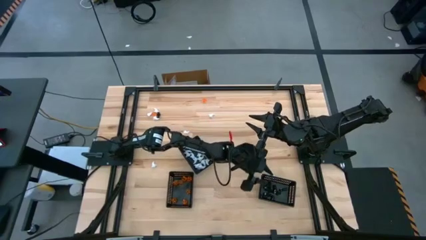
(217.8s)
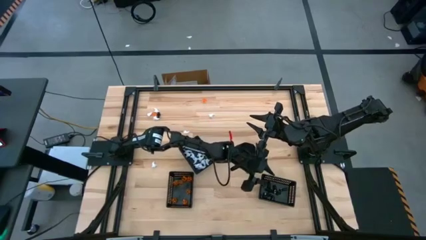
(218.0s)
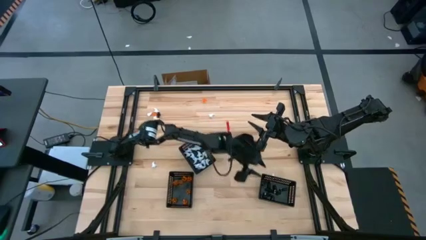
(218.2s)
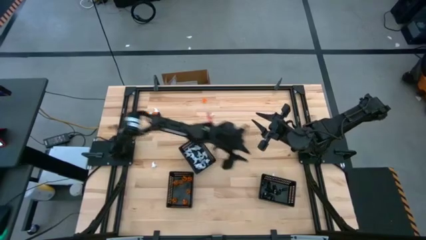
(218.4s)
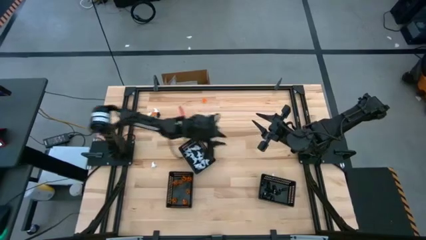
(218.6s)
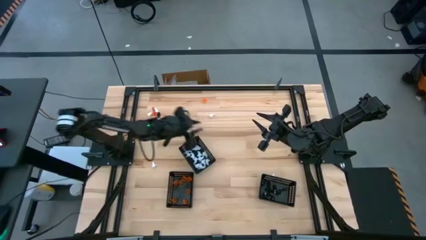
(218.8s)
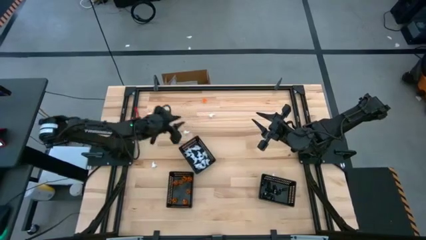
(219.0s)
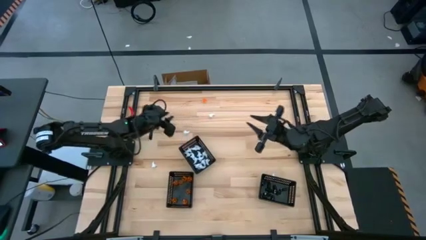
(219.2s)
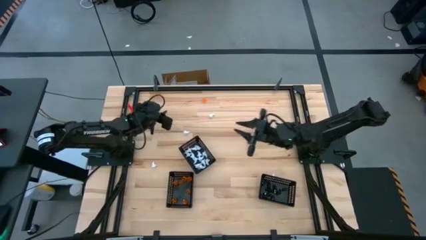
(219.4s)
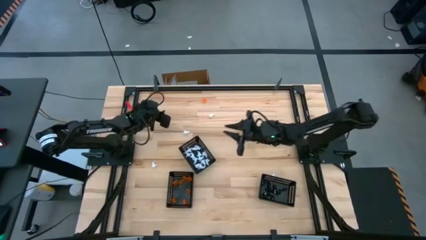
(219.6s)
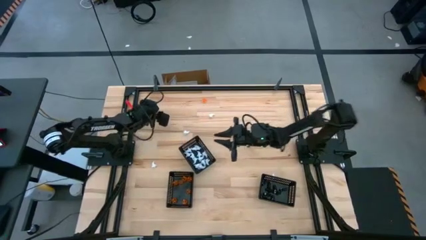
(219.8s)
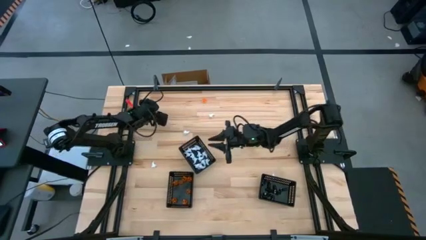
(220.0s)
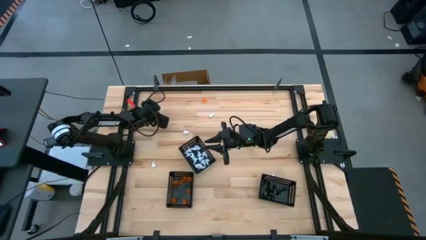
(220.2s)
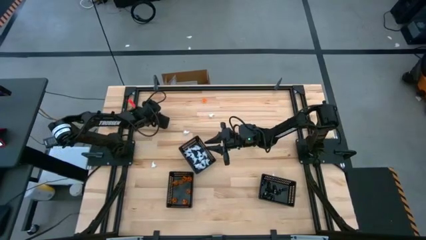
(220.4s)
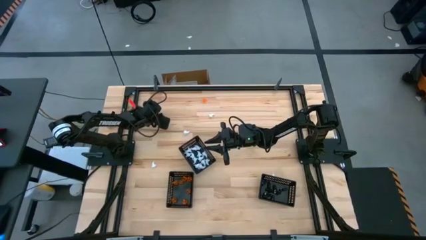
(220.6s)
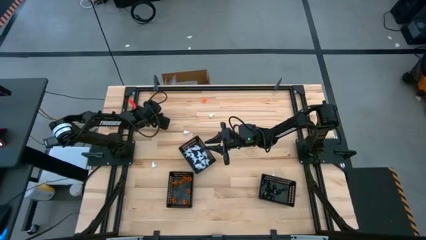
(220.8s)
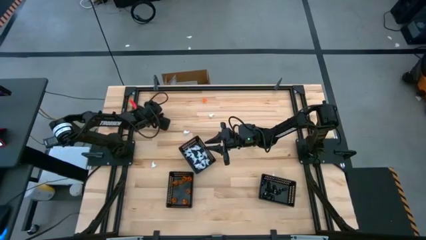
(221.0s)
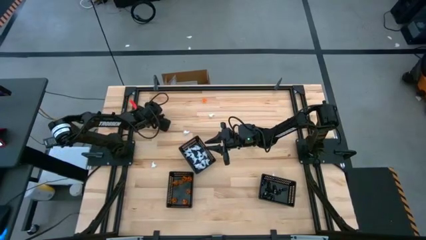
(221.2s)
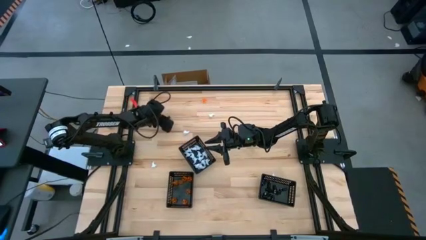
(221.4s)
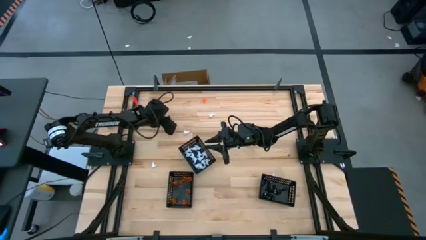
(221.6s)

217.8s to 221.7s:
Task: Sort Halloween decoration
Put the black skeleton toy into the right black basket

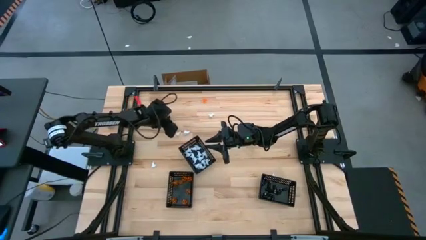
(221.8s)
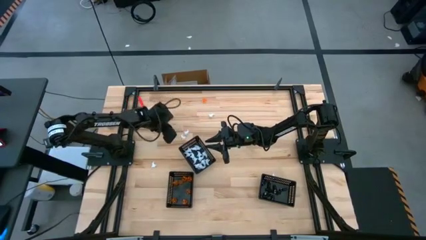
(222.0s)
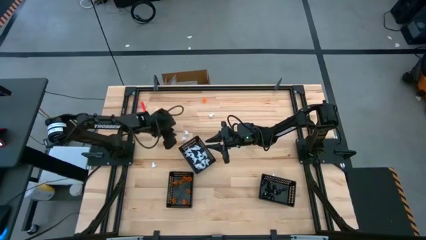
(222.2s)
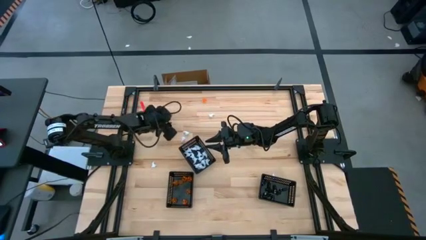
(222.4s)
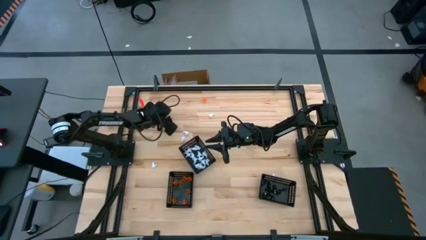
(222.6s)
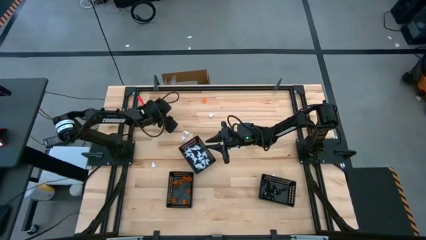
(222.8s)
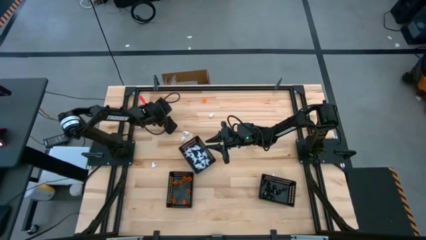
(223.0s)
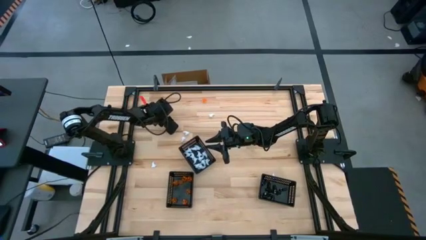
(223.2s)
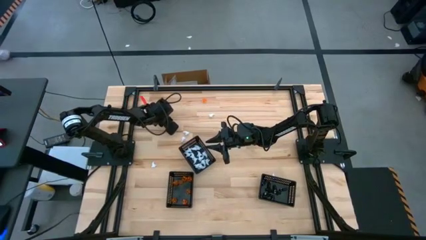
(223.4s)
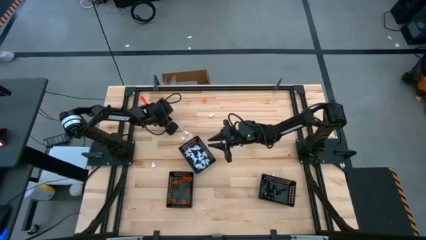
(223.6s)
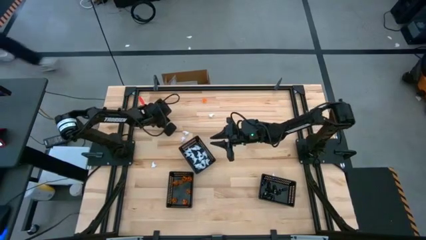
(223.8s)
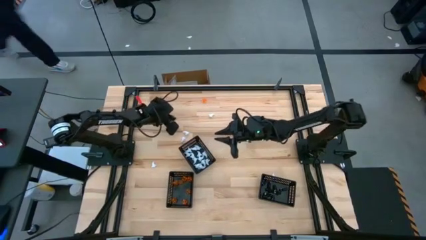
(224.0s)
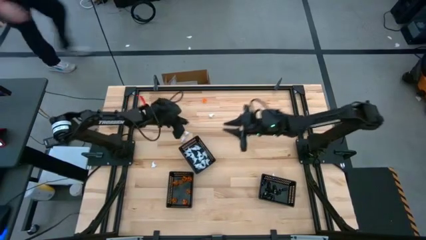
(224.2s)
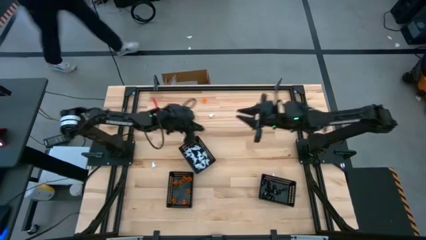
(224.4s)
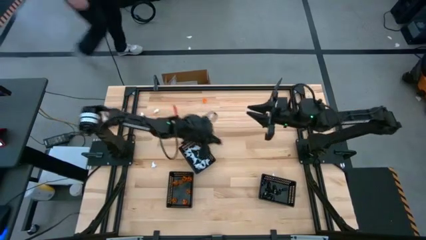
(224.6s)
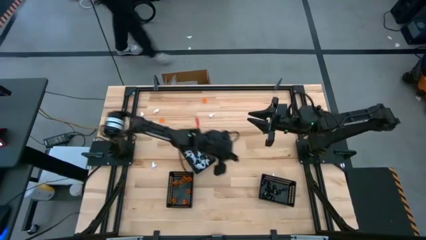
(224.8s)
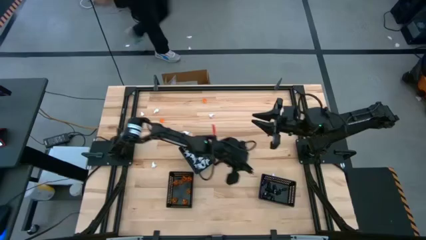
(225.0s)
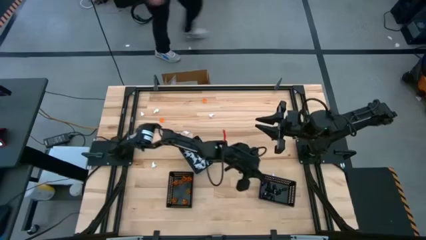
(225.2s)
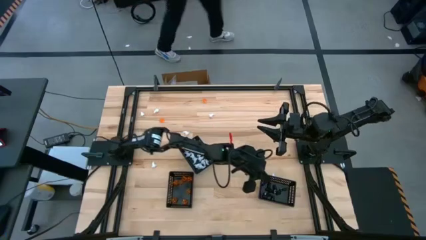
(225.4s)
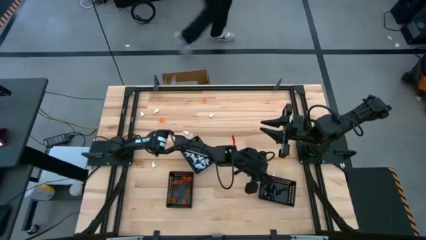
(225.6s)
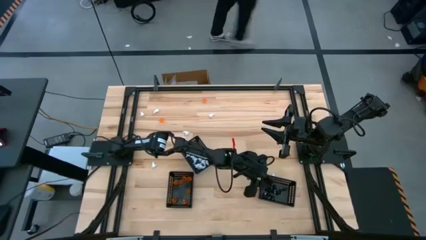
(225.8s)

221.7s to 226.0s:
Put the black skeleton toy into the right black basket

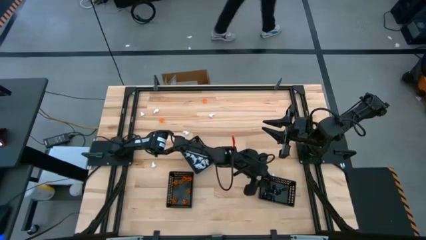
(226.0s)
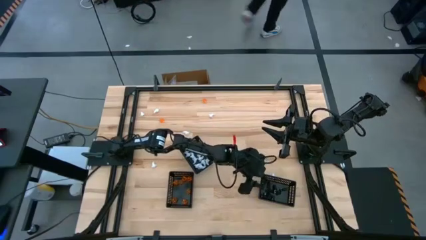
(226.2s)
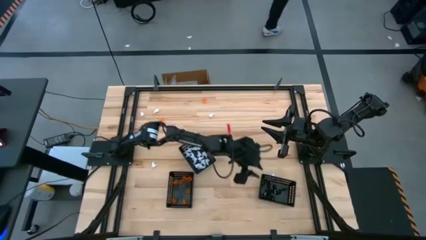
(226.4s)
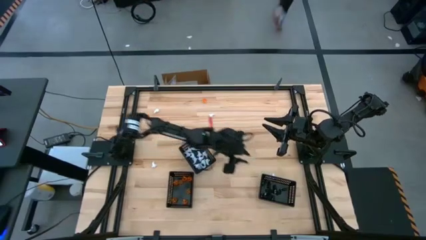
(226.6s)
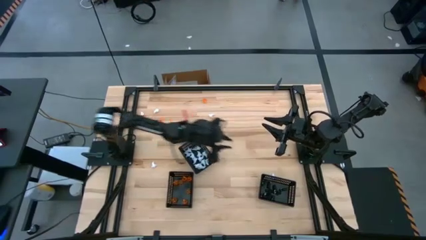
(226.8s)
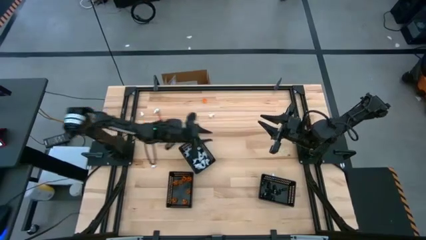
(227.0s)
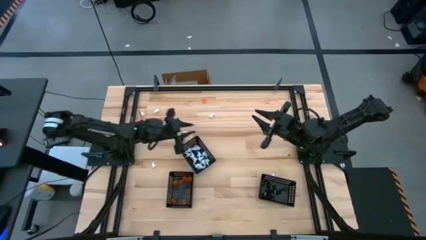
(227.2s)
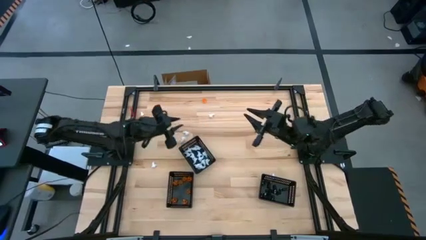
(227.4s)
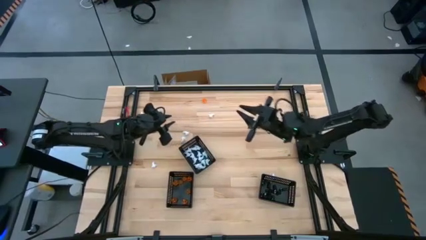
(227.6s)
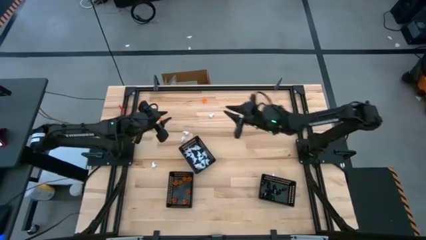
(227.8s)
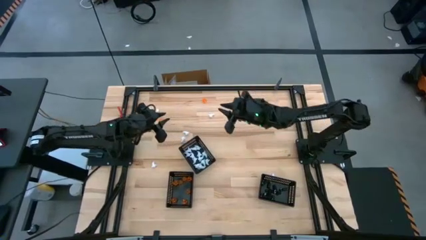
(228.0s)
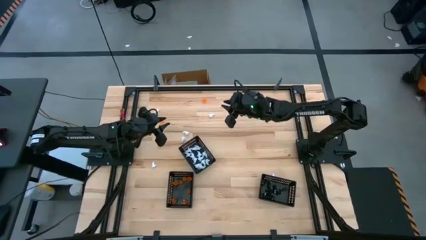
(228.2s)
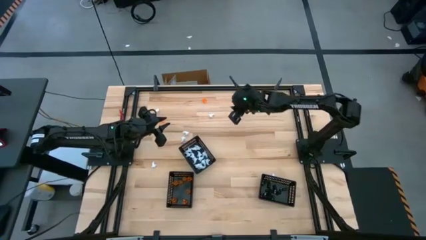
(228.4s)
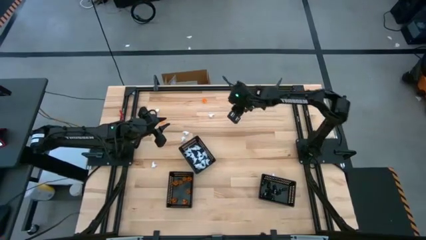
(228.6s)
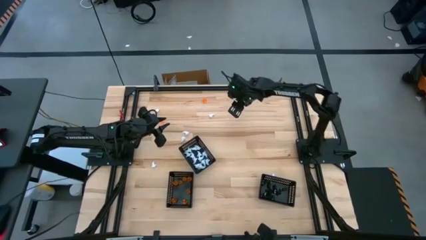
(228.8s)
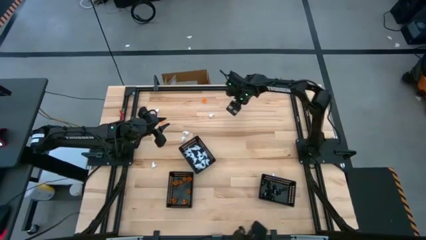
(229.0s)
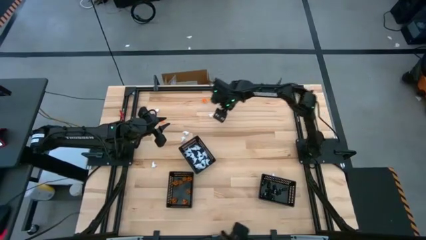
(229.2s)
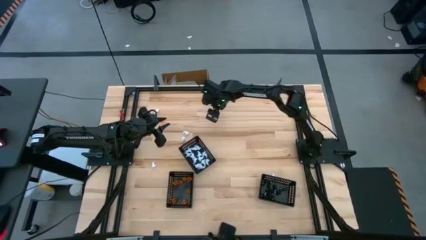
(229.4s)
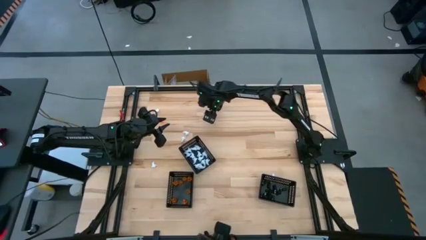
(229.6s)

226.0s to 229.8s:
Put the white ghost toy into the middle black basket

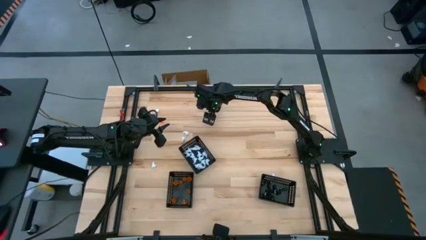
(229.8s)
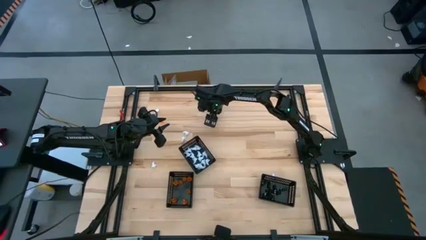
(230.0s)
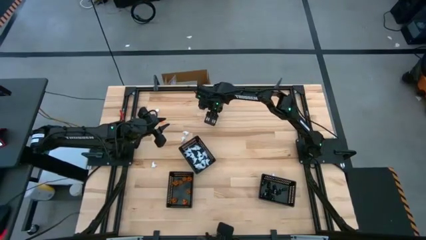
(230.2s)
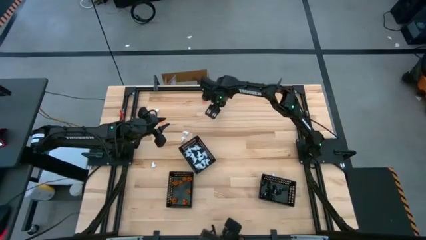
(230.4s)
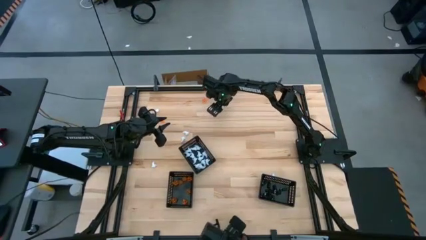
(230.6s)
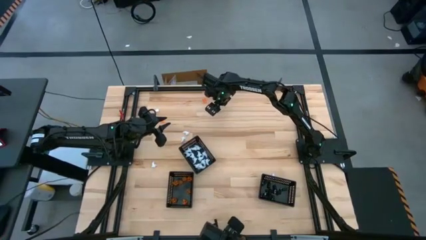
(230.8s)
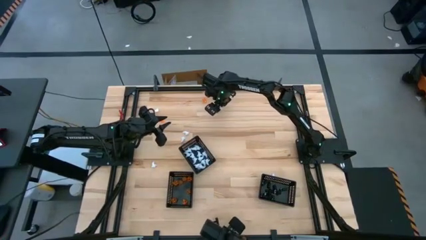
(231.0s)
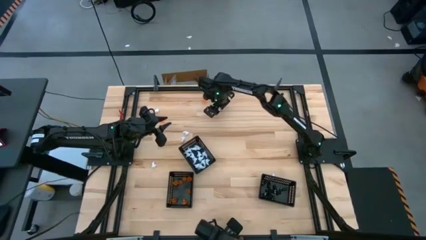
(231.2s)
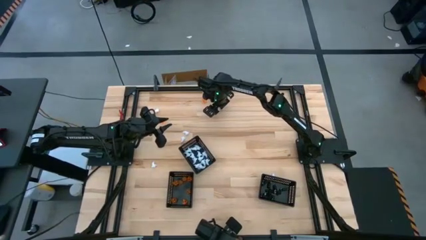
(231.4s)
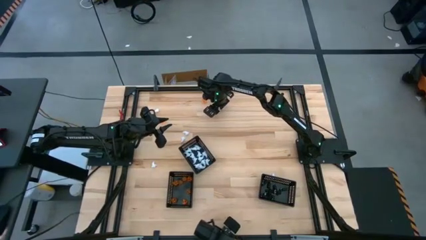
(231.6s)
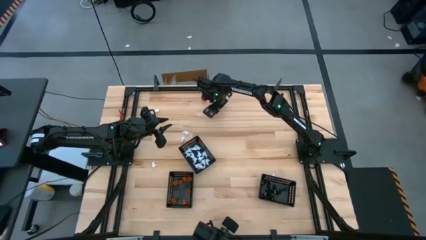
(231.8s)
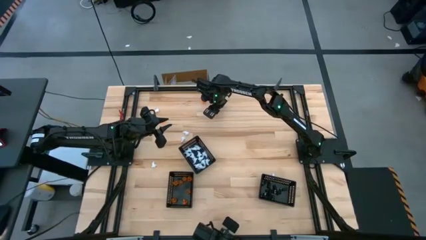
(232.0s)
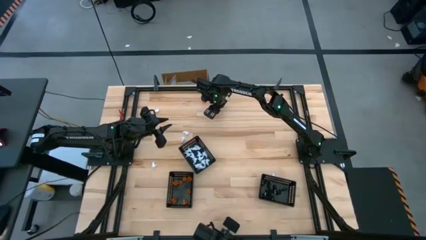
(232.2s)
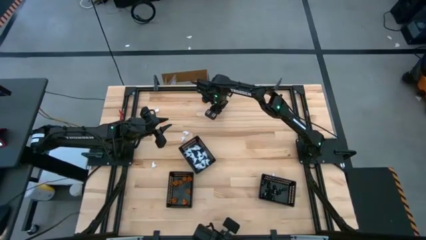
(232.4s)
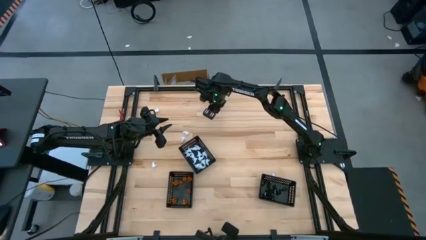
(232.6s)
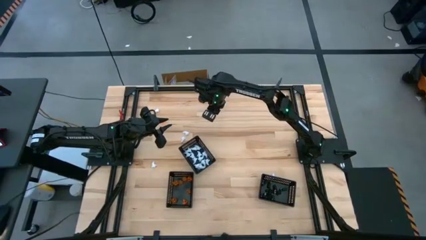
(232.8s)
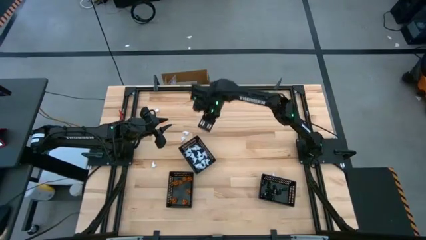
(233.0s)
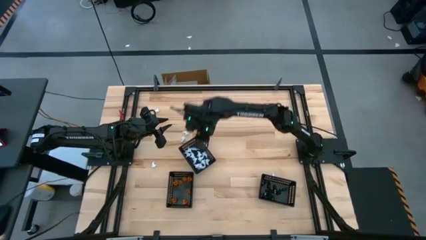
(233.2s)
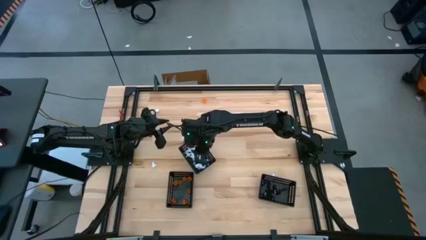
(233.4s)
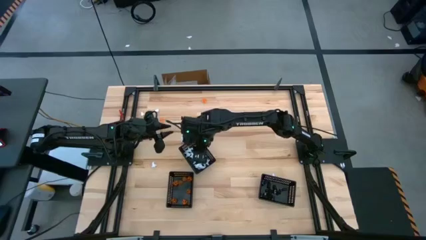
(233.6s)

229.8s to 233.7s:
Put the white ghost toy into the middle black basket
